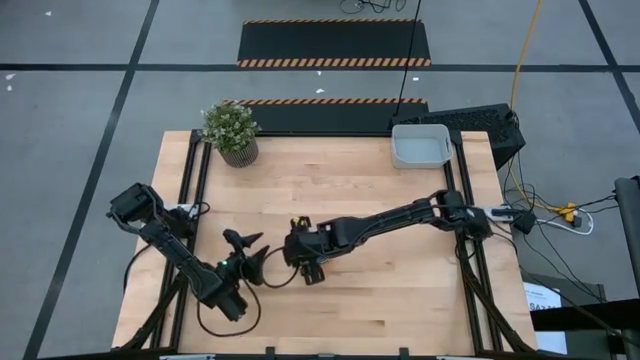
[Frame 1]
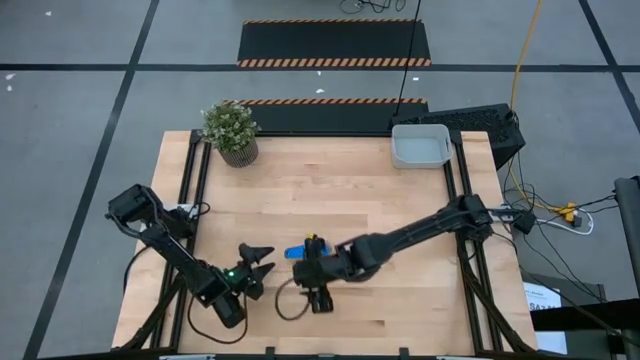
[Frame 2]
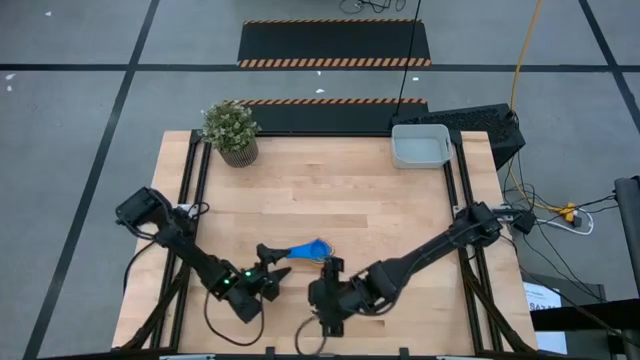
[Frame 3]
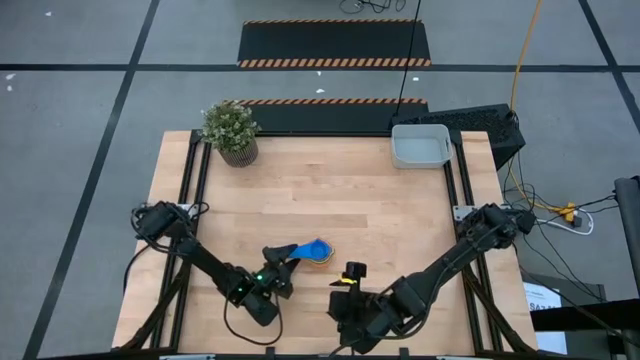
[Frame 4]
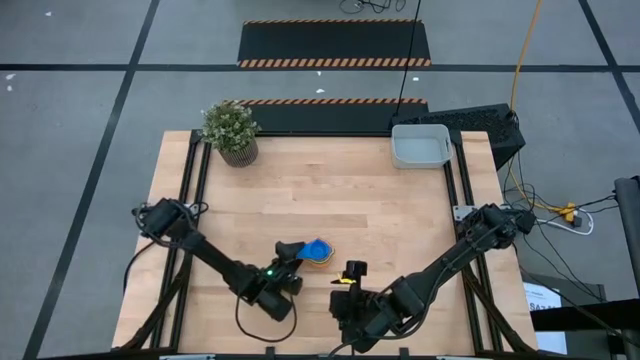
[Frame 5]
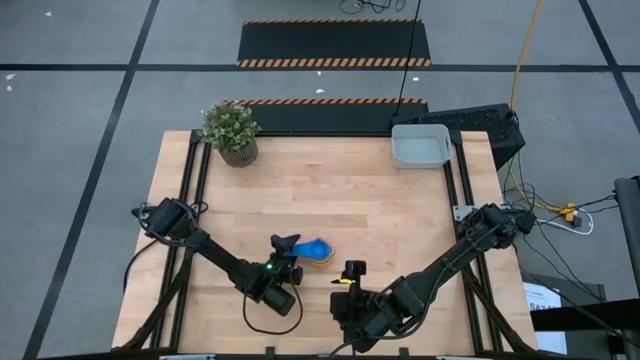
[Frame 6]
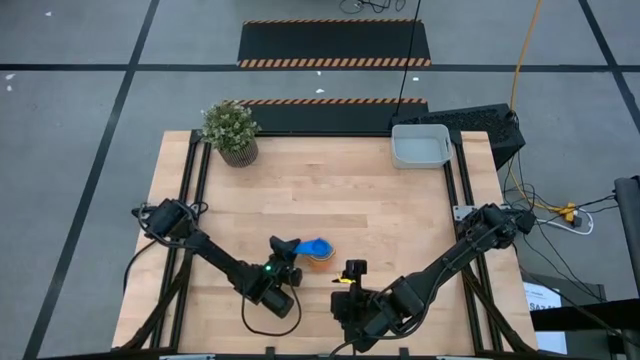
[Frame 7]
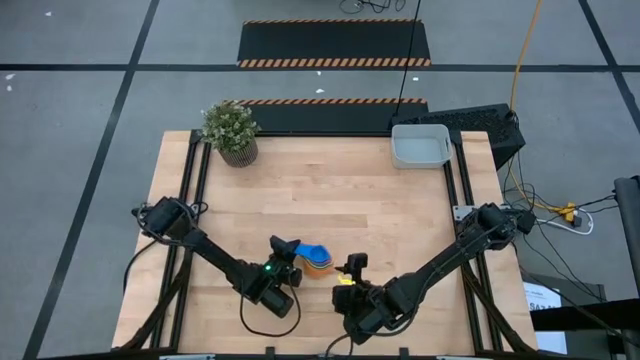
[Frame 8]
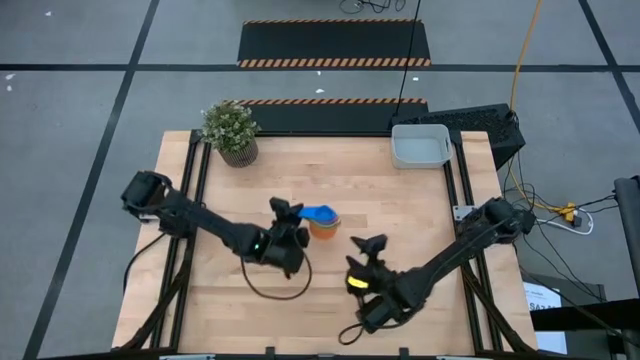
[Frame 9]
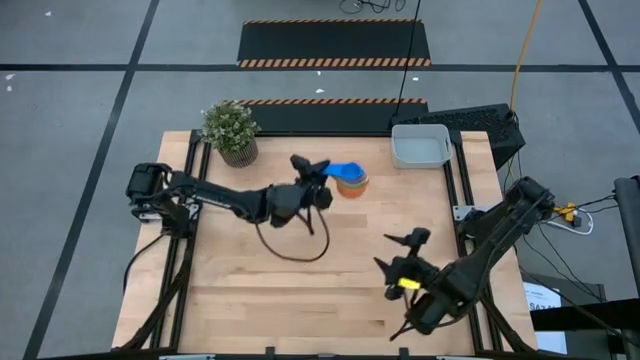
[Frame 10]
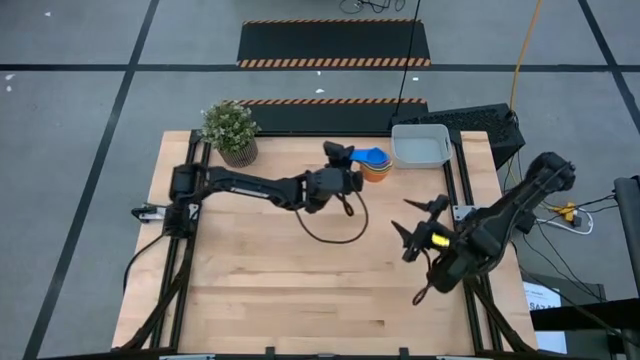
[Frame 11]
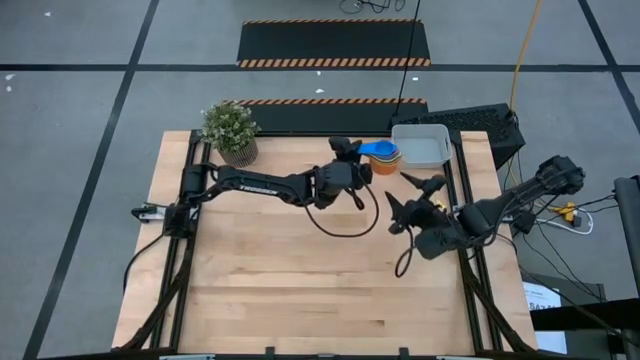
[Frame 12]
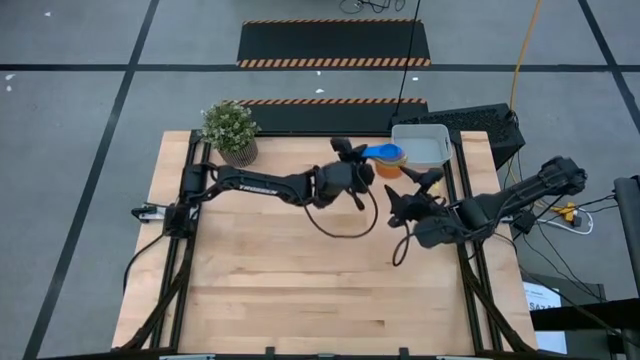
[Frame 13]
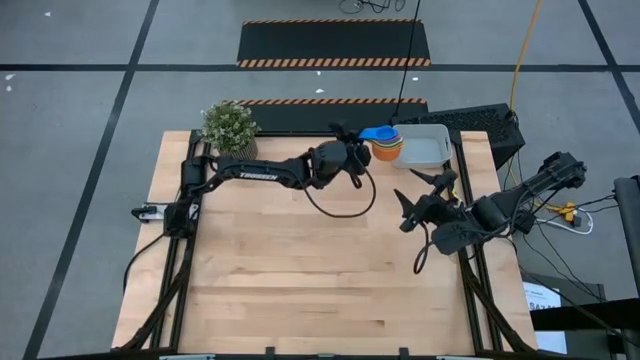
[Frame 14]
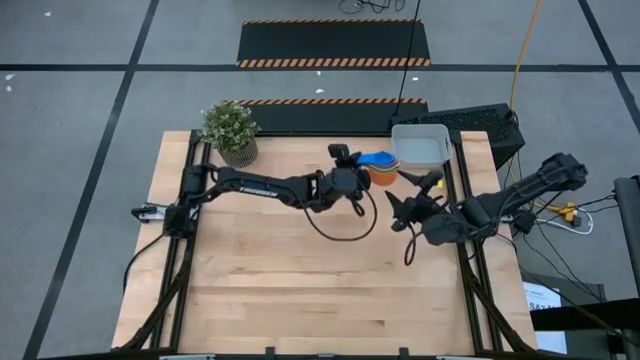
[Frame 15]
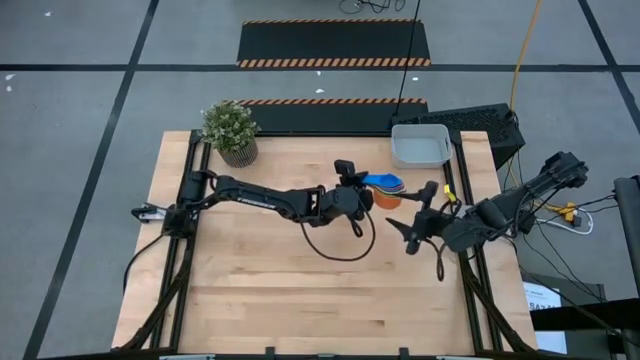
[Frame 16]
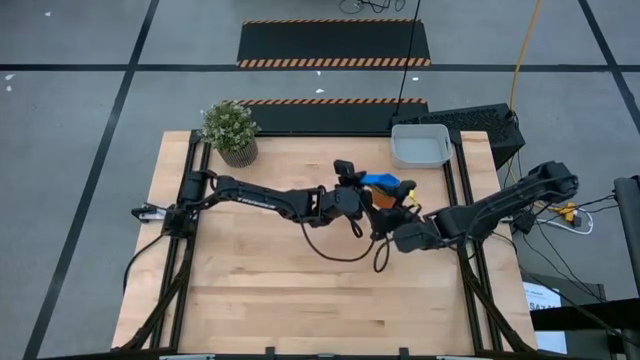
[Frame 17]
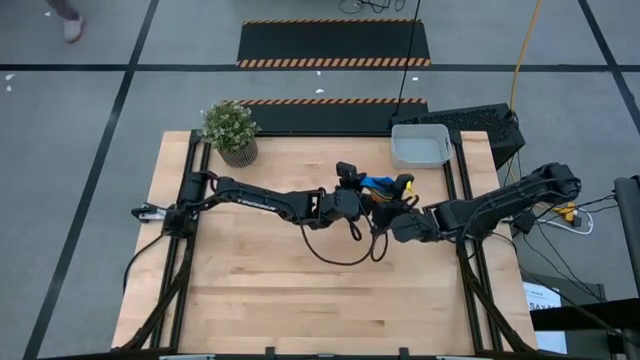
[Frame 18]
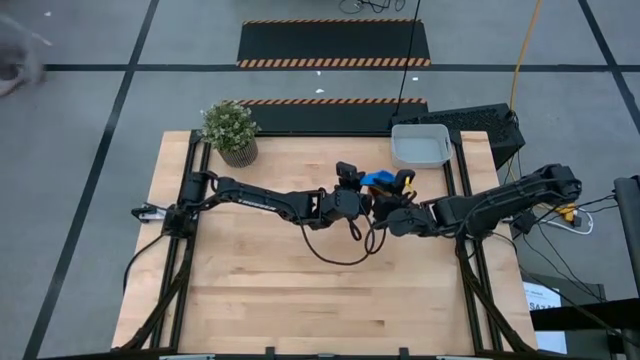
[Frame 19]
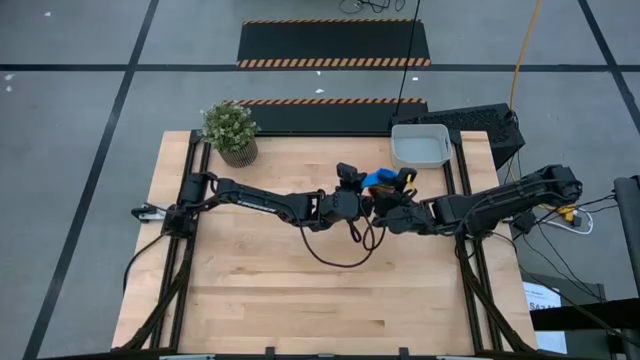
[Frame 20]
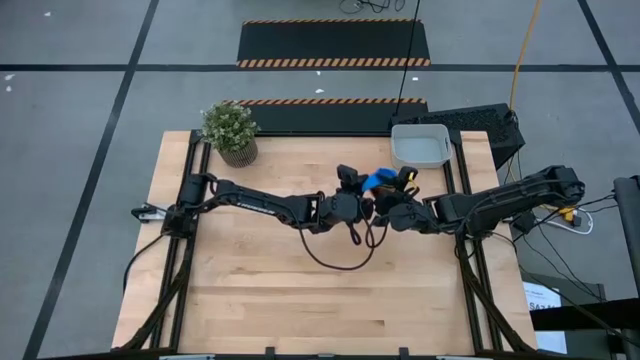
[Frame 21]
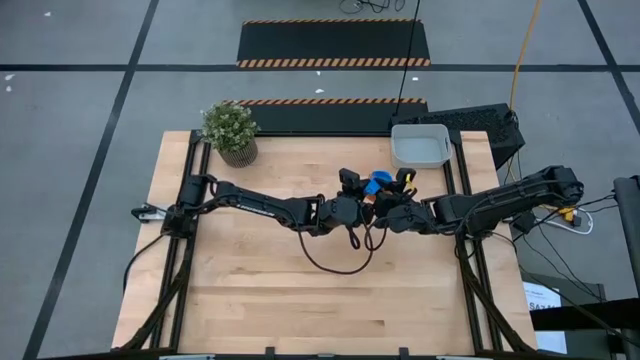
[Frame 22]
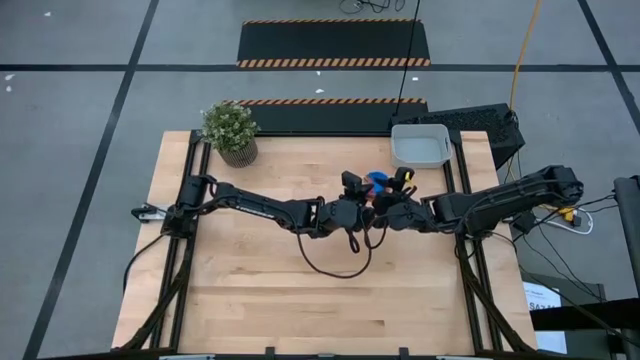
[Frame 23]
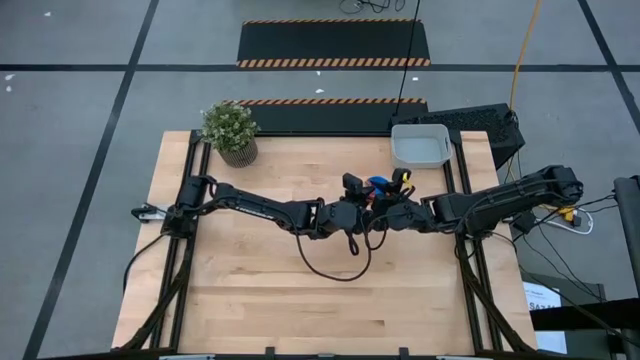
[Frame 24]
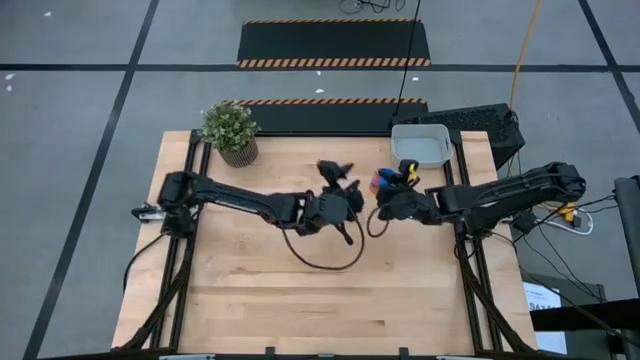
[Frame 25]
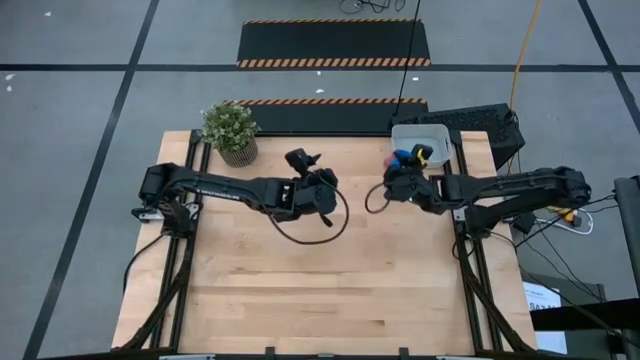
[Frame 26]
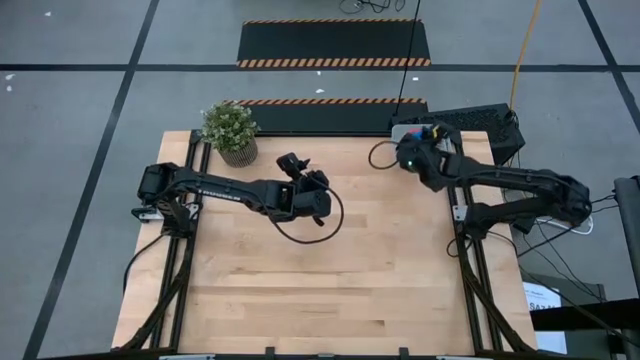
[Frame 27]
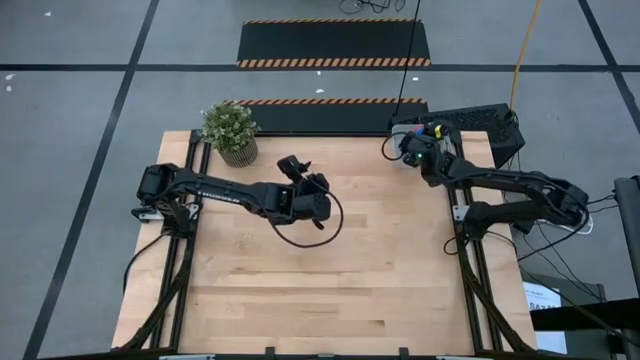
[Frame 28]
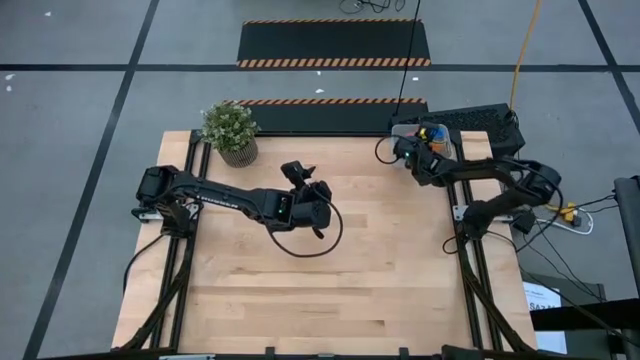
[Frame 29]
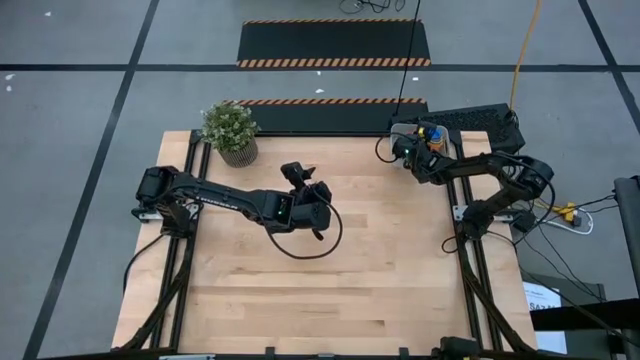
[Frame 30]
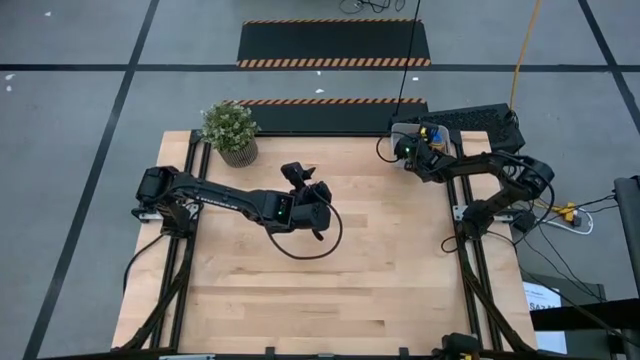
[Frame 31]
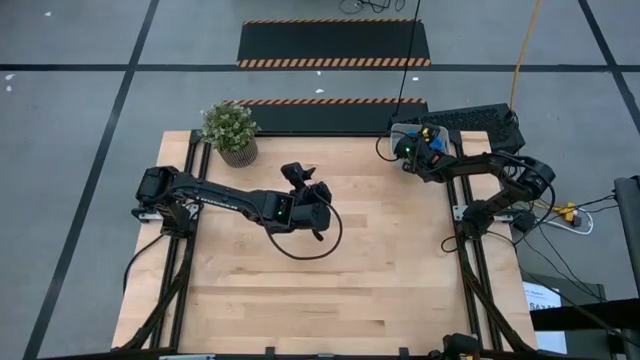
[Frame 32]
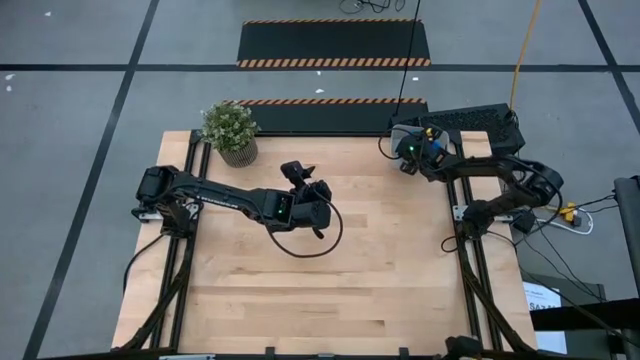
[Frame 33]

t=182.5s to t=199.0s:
Task: Nest measuring cups in basket
Put the stacked measuring cups into the gray bin

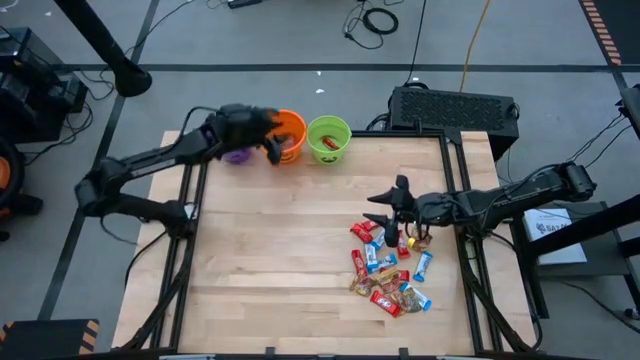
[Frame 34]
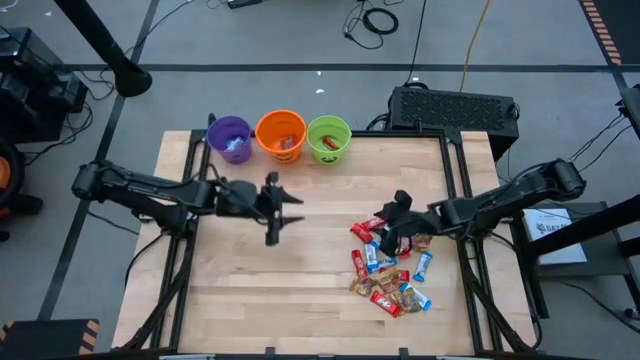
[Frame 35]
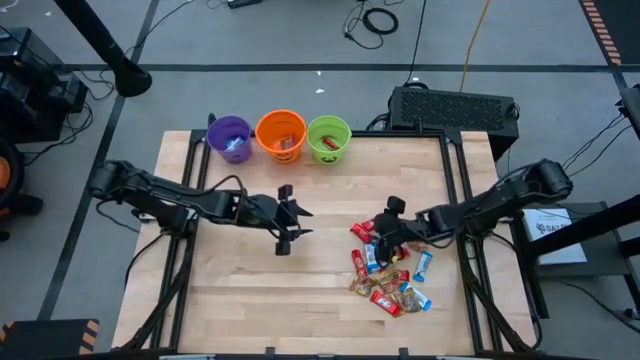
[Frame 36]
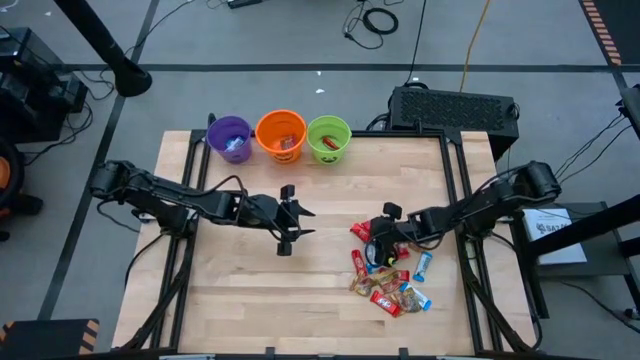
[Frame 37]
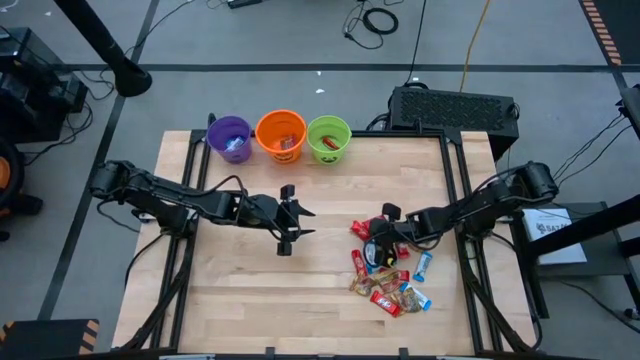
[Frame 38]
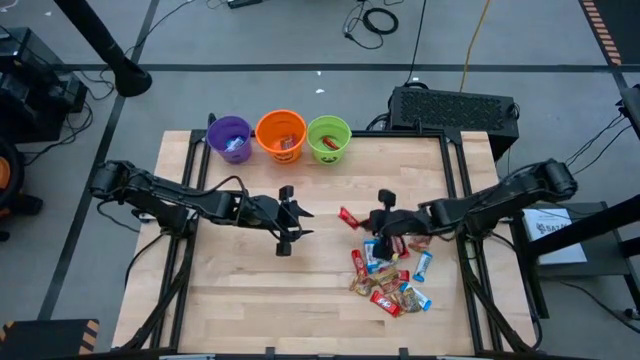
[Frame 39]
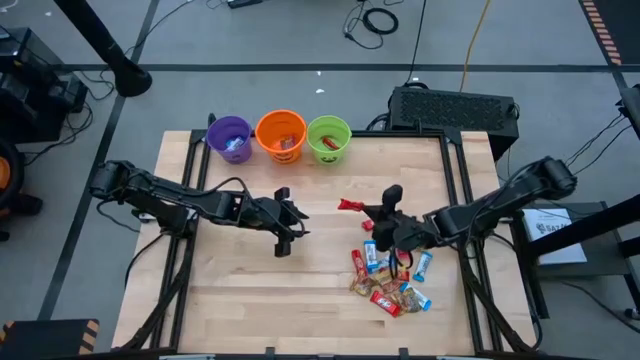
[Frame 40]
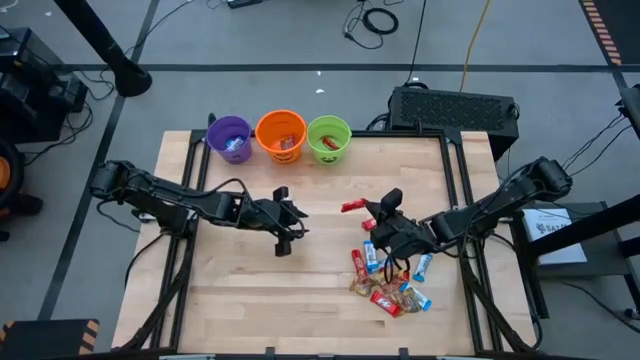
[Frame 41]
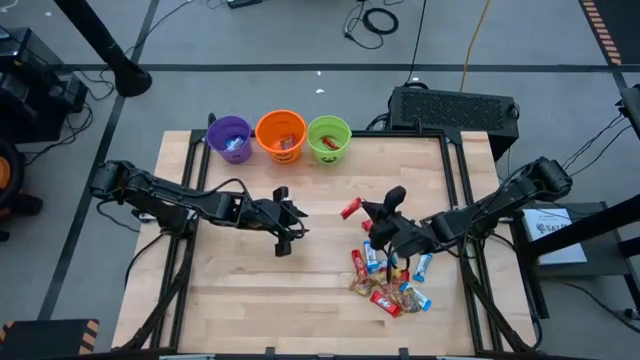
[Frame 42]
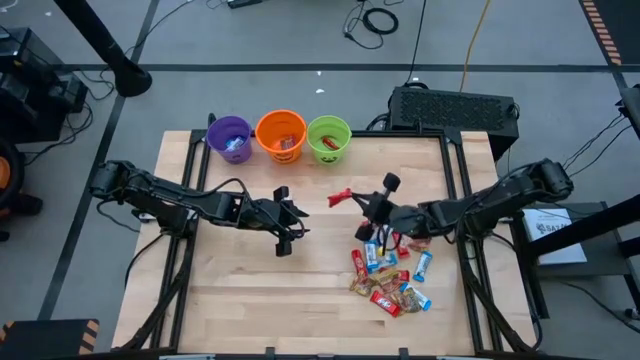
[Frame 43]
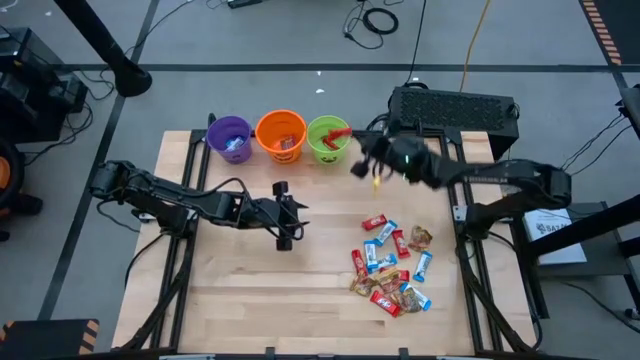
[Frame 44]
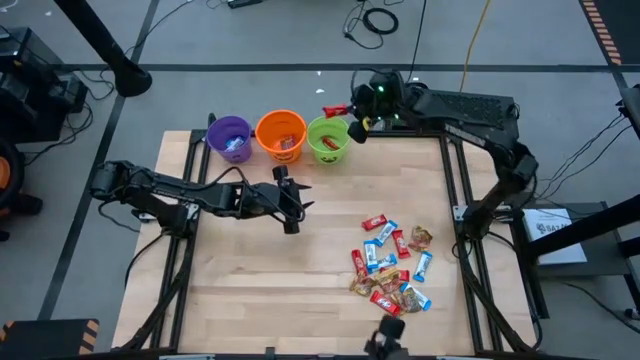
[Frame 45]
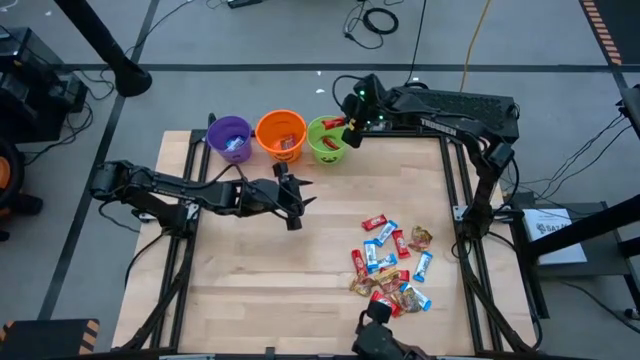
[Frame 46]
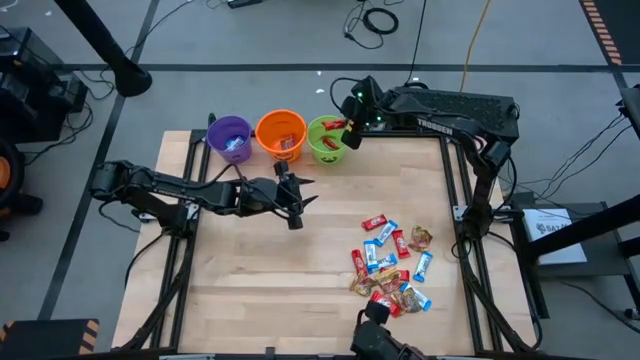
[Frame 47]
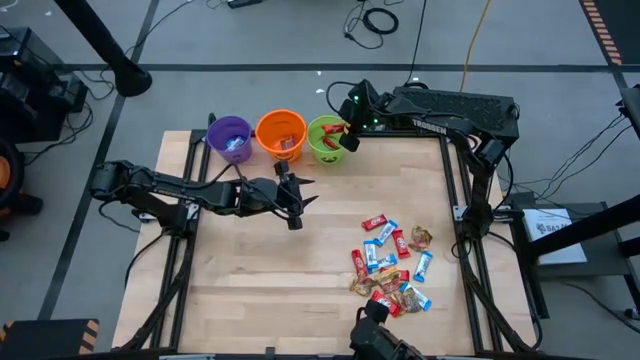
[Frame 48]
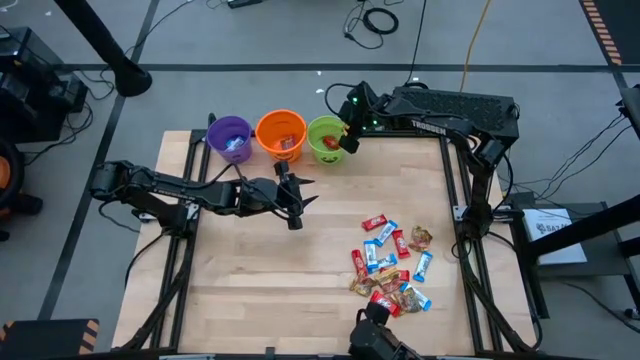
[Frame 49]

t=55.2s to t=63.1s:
Task: Sort candy by brand, put in halloween buckets
Put the red chocolate bar into the green bucket
